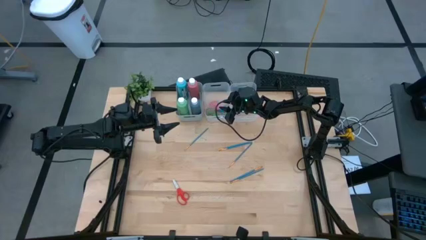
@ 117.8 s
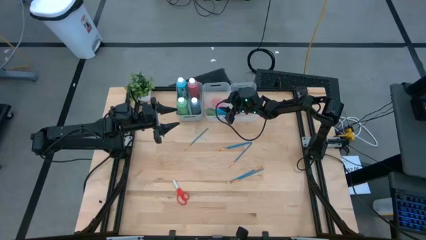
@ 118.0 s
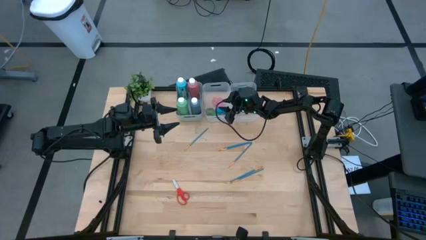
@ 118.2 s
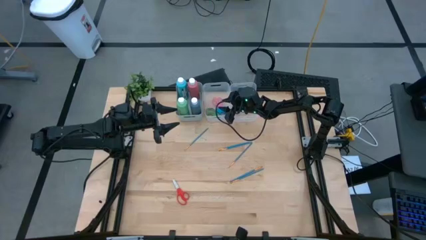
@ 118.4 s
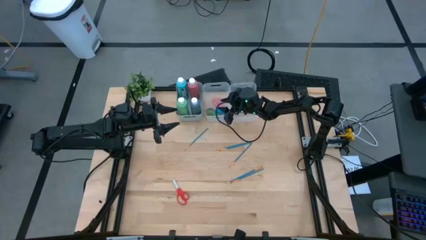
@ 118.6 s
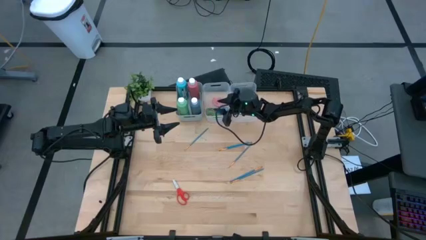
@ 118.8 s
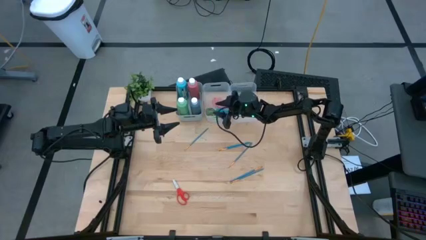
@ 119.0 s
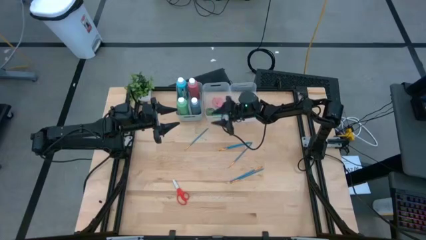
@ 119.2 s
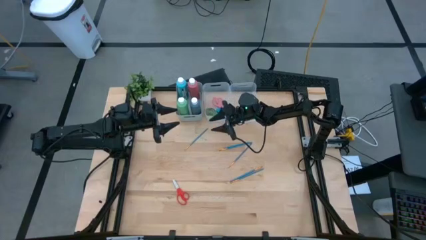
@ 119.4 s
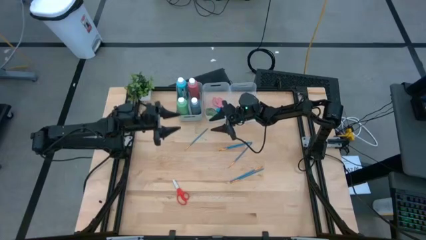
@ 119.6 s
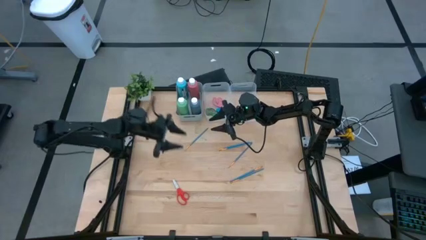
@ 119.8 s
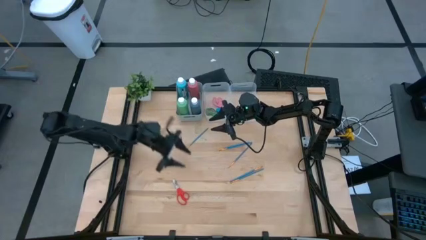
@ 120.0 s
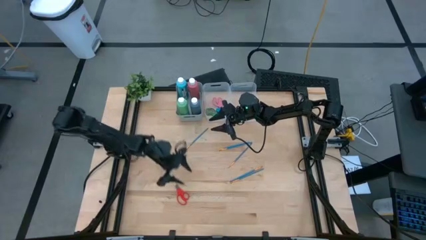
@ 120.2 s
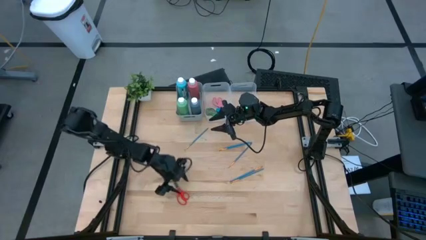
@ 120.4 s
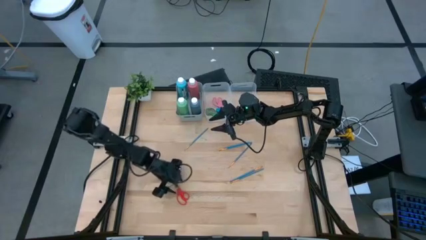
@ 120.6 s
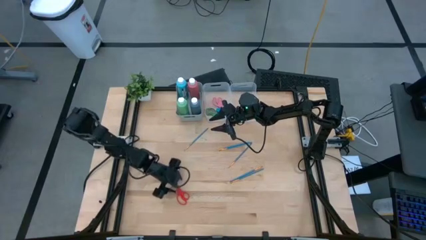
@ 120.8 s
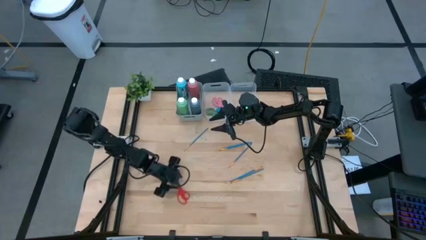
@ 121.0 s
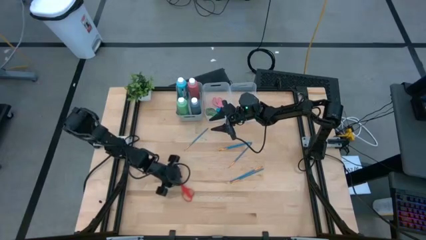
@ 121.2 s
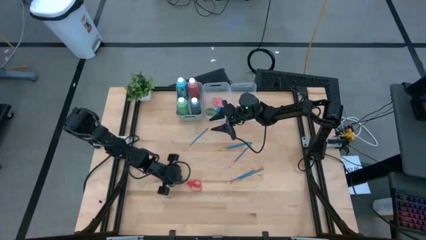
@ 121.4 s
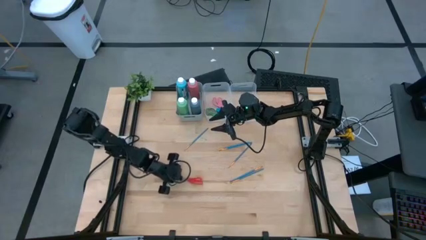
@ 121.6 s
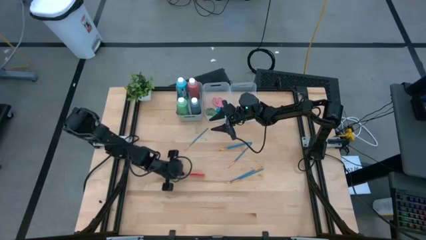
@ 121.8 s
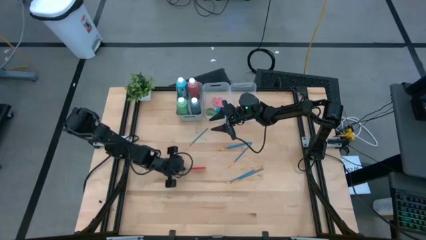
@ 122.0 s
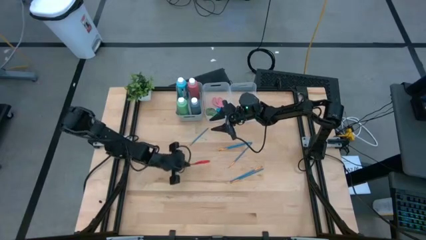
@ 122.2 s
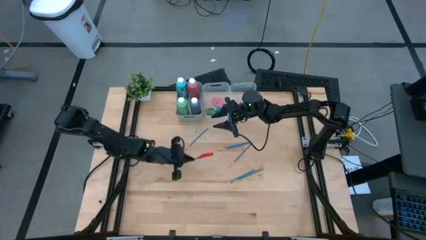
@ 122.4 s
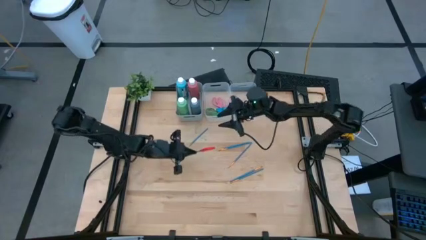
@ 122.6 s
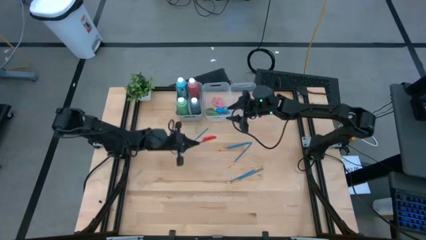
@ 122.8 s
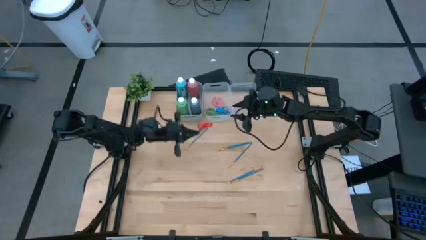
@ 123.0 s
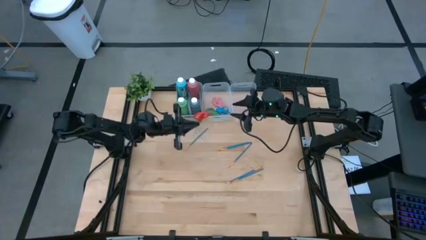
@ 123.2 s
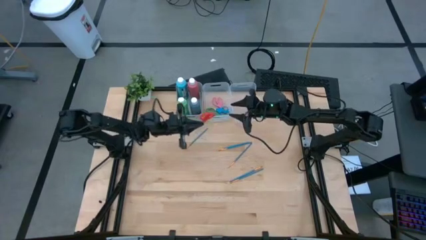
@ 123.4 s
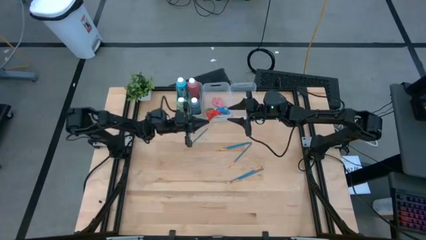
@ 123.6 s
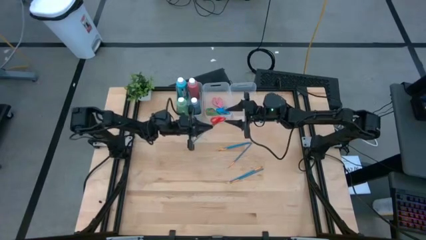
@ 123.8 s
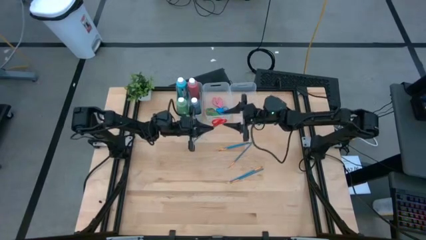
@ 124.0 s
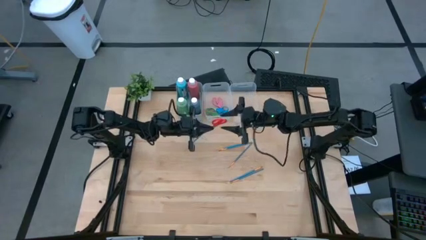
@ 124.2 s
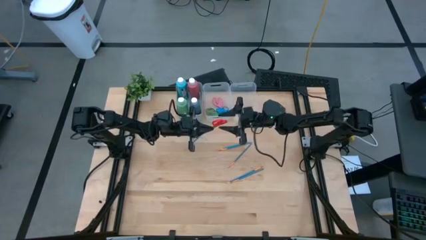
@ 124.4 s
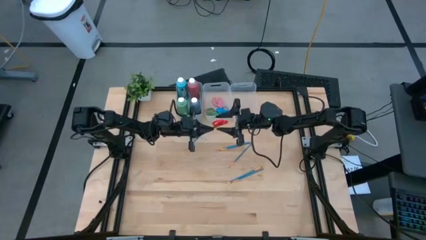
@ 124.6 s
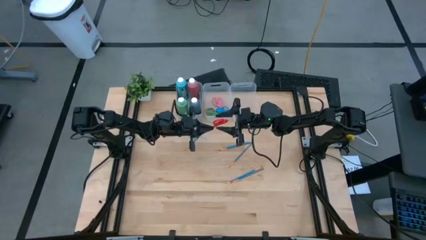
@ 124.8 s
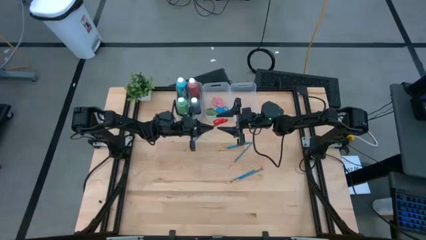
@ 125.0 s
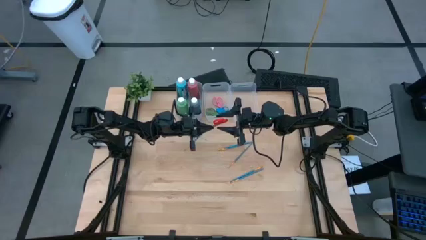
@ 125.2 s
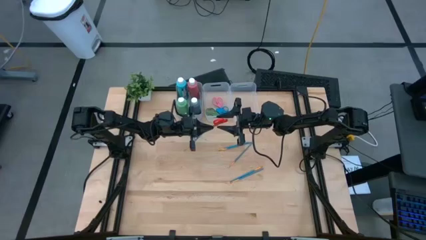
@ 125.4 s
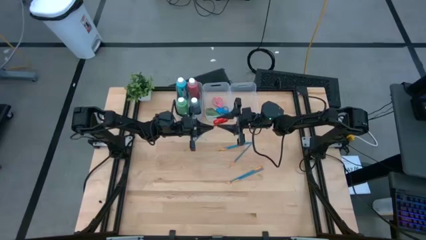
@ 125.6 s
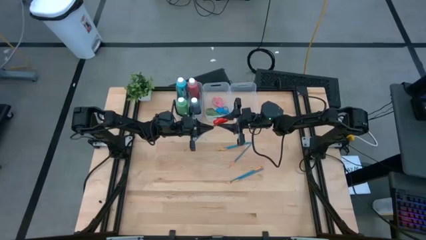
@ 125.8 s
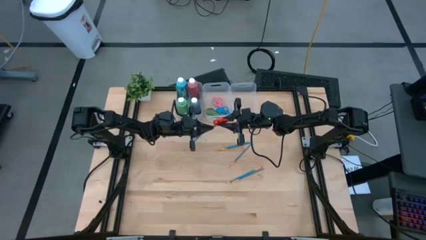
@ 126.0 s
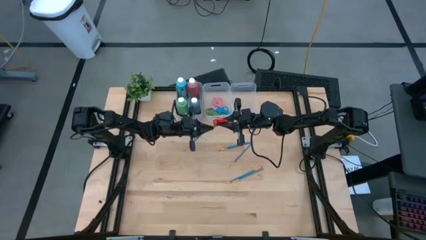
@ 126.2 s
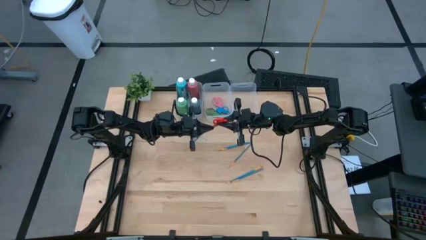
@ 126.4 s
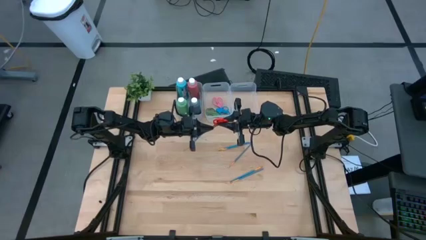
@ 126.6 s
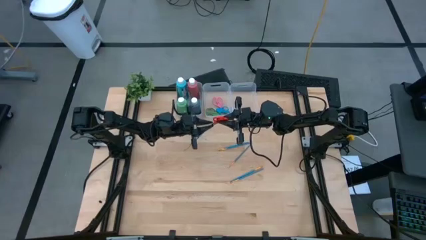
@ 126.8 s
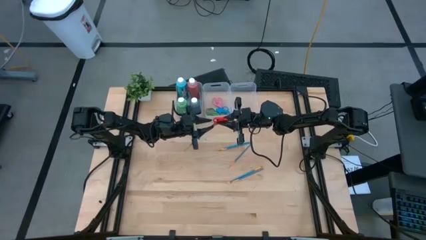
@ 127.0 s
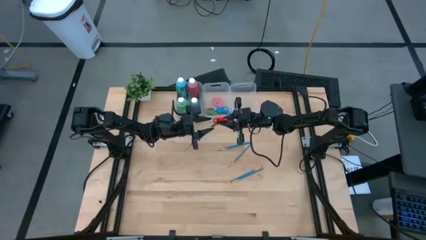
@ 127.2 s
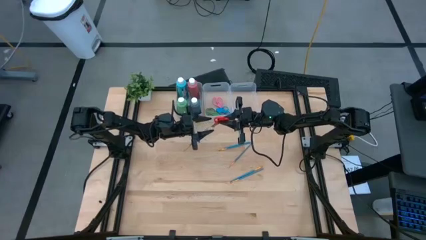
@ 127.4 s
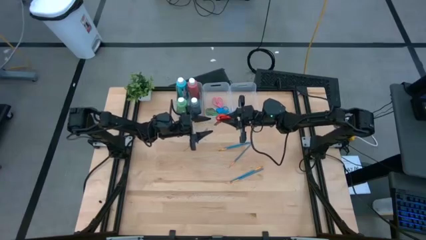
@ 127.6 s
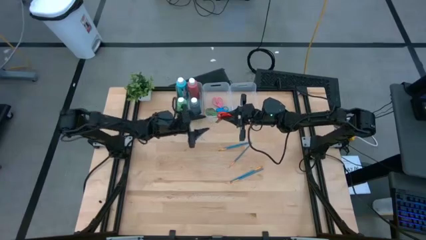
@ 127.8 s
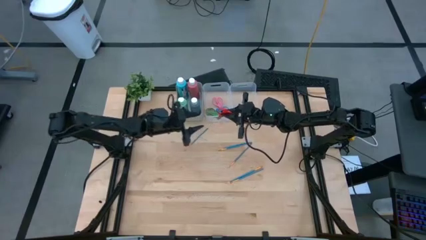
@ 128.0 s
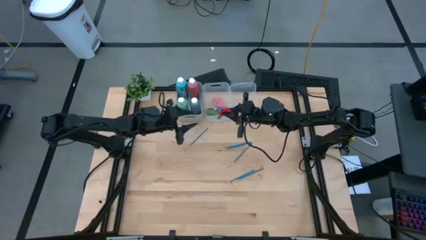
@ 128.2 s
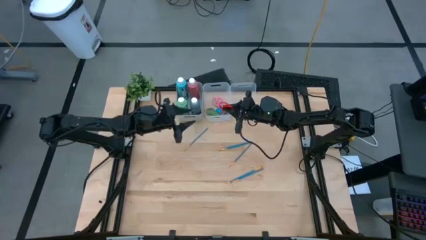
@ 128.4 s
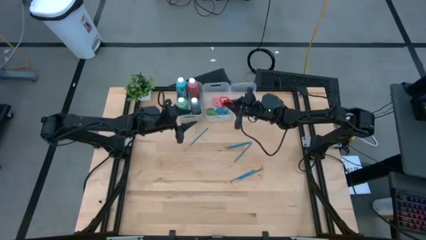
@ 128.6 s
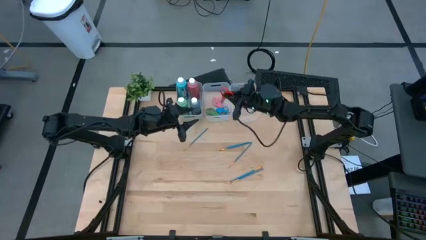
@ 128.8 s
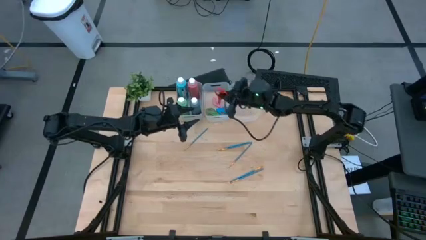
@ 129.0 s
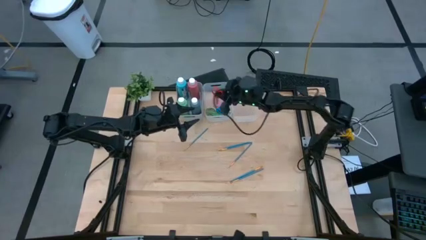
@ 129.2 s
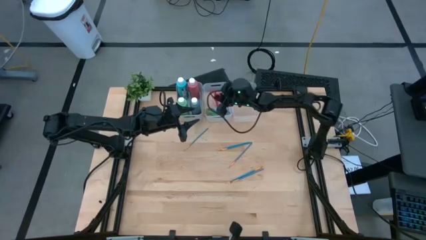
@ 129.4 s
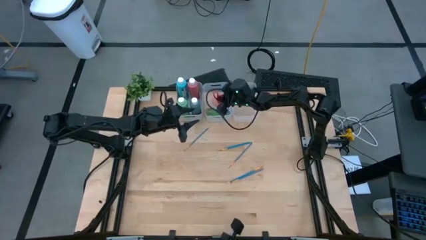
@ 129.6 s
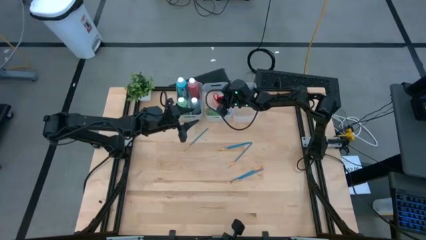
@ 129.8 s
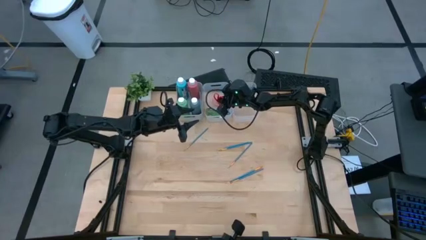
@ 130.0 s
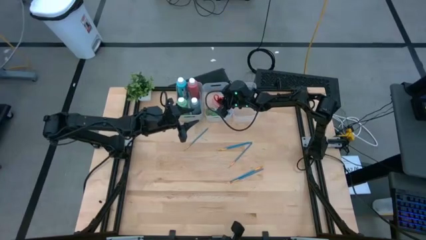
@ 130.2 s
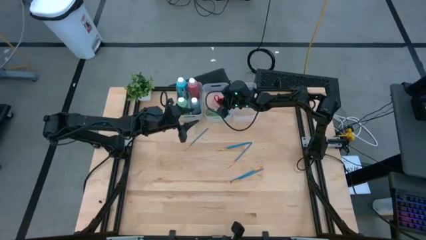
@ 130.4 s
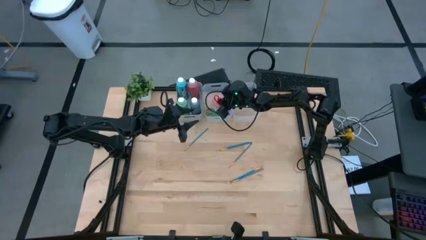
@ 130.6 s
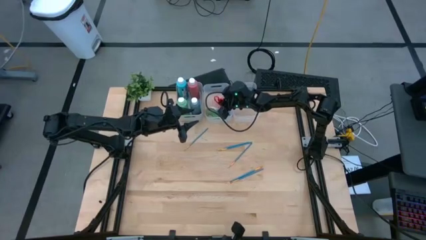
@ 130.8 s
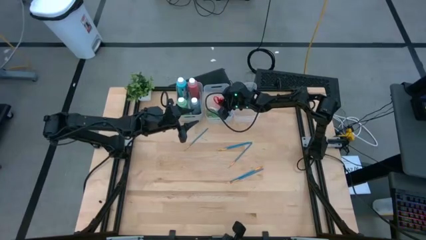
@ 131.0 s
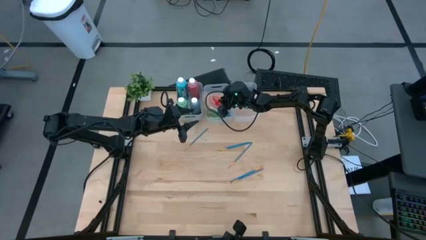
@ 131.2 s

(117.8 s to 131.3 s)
Task: Pick & Place Paint Supplies
Put the red scissors into the left transparent bin
